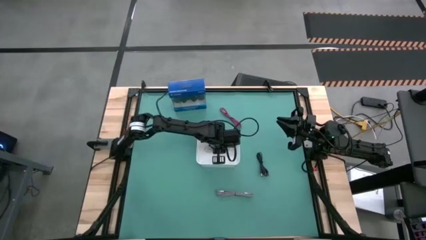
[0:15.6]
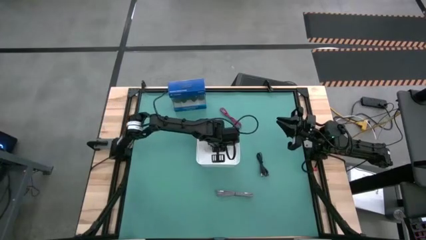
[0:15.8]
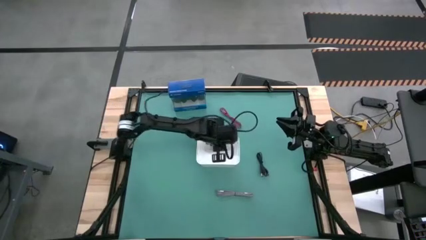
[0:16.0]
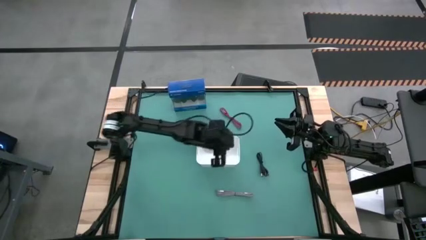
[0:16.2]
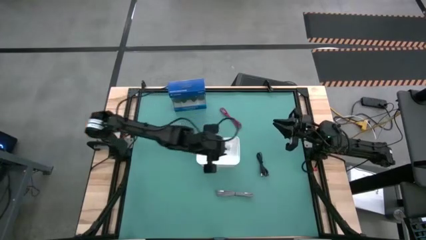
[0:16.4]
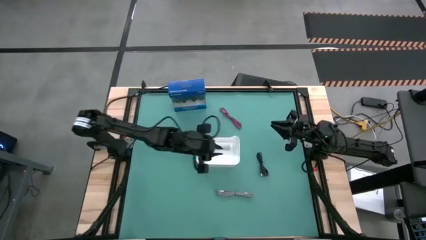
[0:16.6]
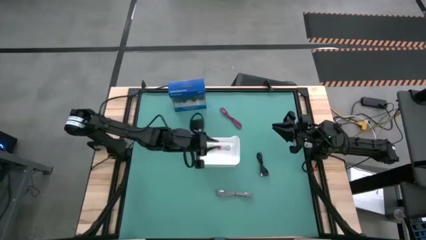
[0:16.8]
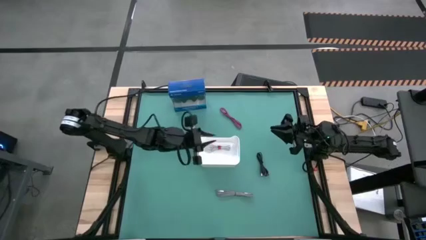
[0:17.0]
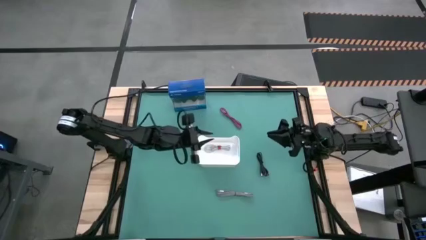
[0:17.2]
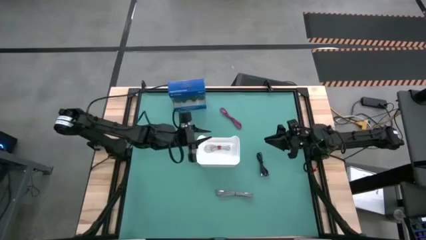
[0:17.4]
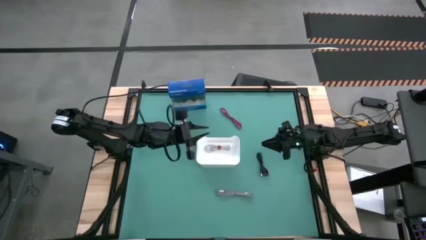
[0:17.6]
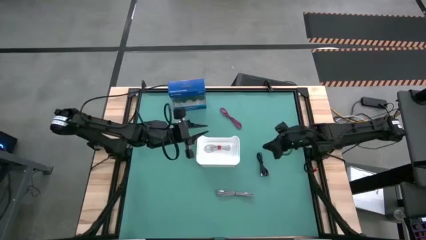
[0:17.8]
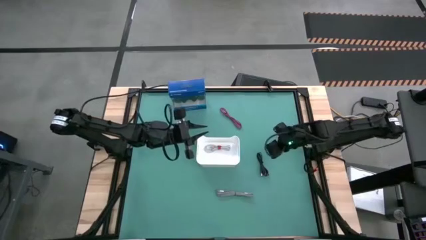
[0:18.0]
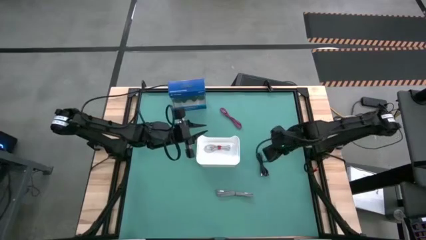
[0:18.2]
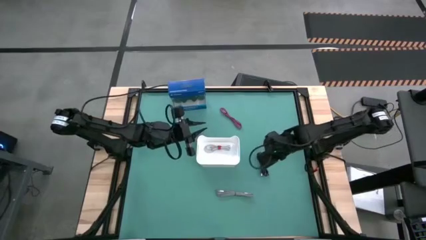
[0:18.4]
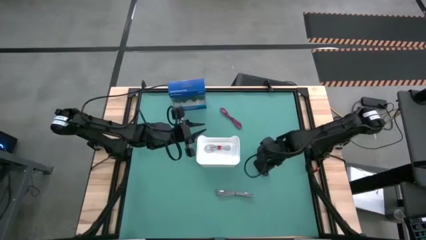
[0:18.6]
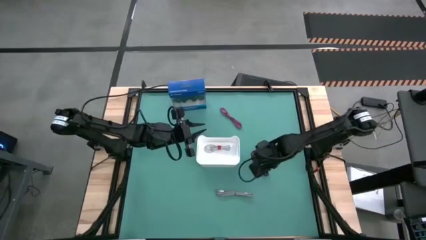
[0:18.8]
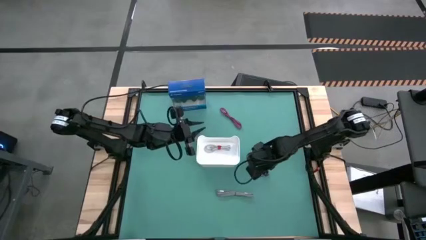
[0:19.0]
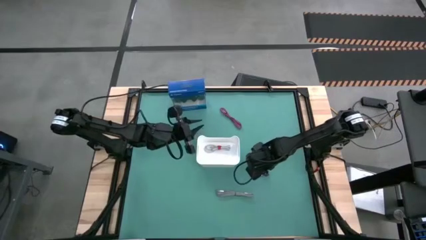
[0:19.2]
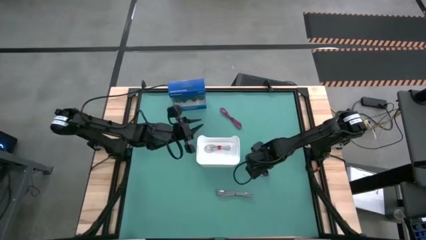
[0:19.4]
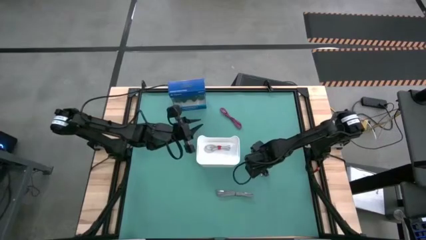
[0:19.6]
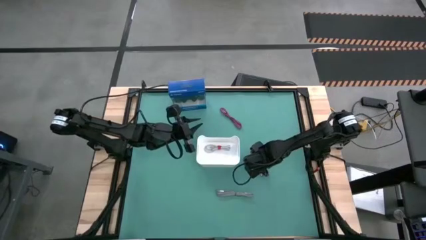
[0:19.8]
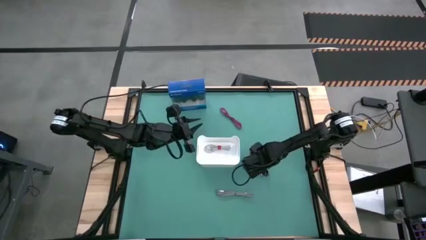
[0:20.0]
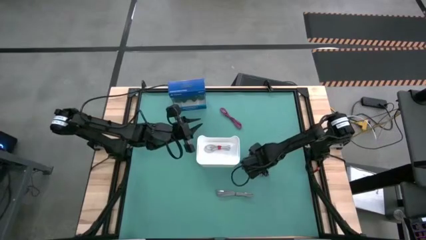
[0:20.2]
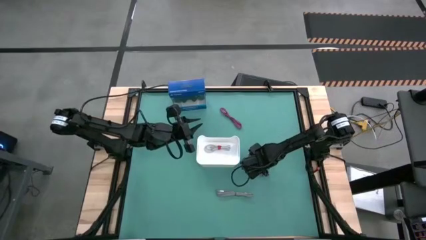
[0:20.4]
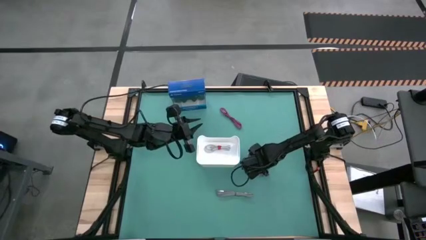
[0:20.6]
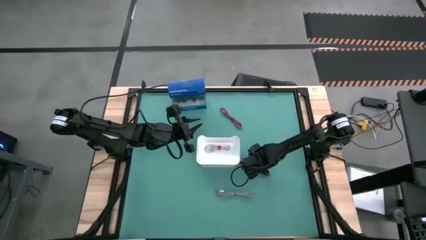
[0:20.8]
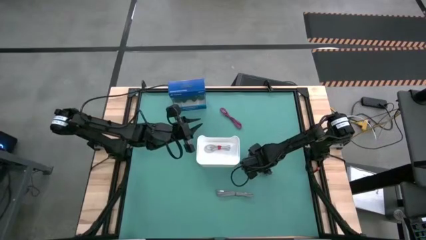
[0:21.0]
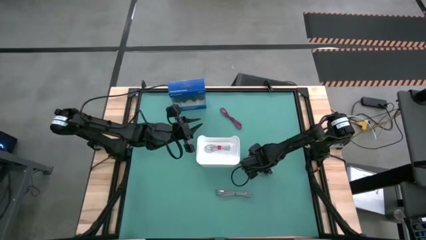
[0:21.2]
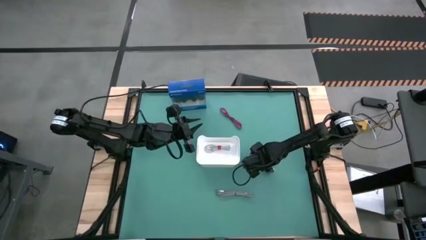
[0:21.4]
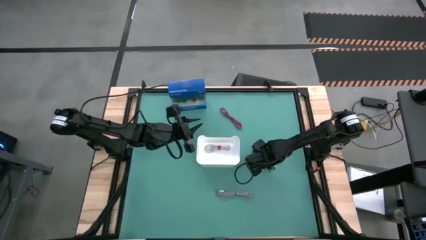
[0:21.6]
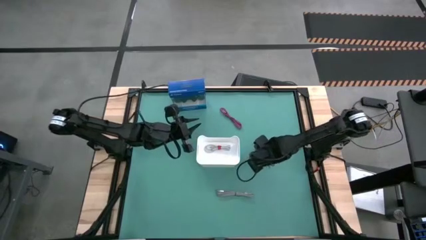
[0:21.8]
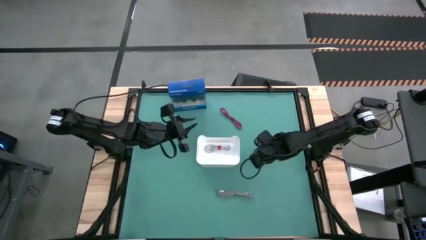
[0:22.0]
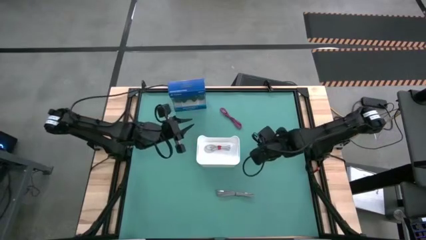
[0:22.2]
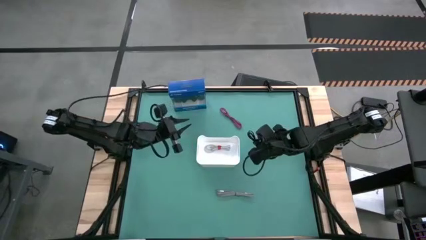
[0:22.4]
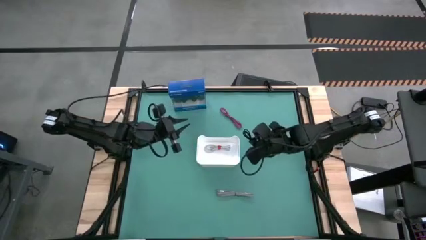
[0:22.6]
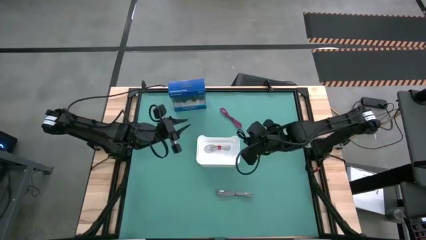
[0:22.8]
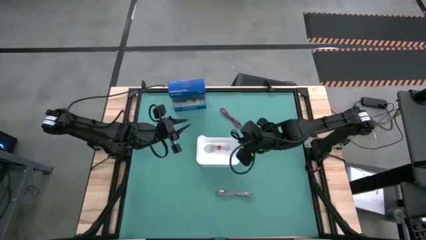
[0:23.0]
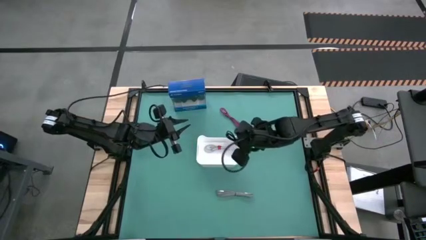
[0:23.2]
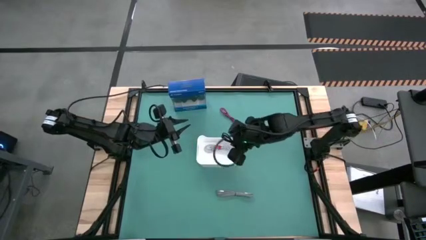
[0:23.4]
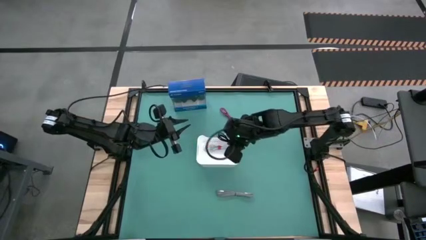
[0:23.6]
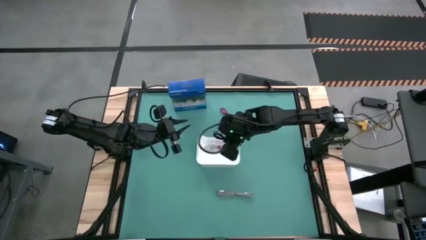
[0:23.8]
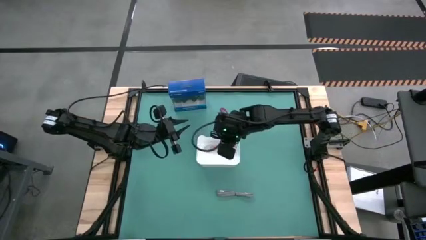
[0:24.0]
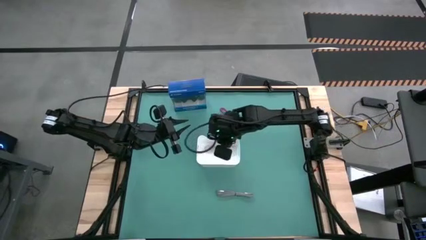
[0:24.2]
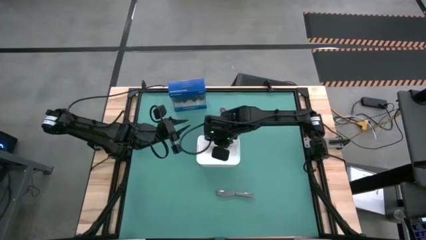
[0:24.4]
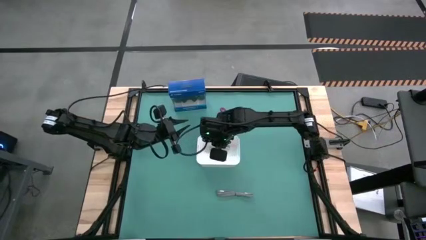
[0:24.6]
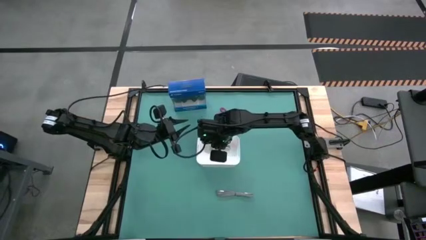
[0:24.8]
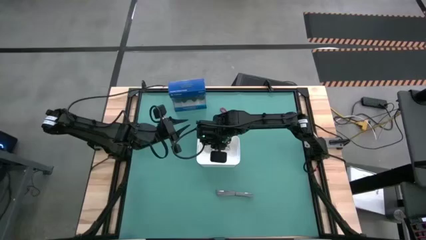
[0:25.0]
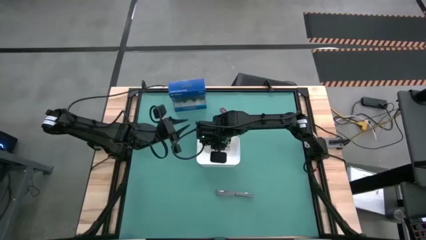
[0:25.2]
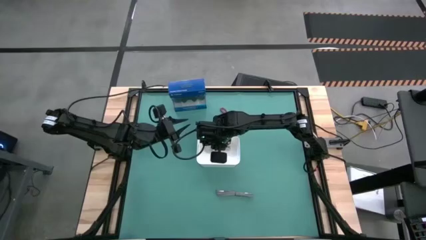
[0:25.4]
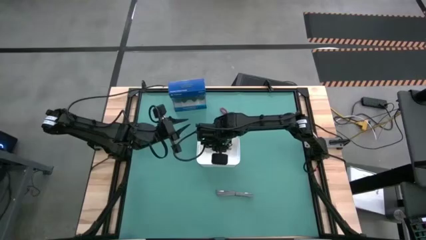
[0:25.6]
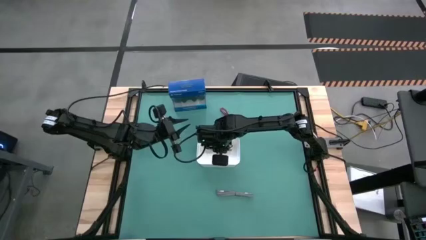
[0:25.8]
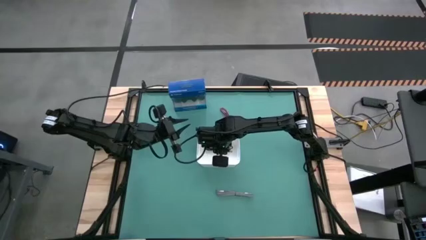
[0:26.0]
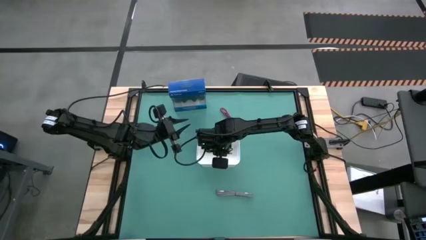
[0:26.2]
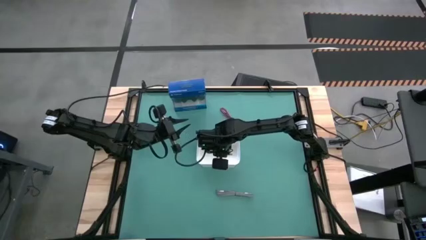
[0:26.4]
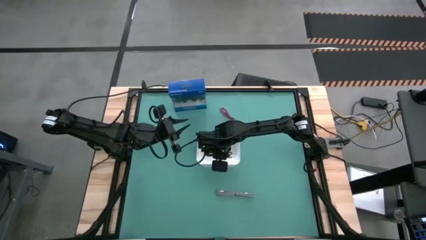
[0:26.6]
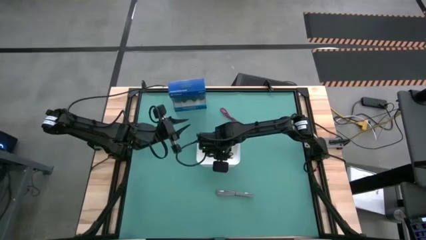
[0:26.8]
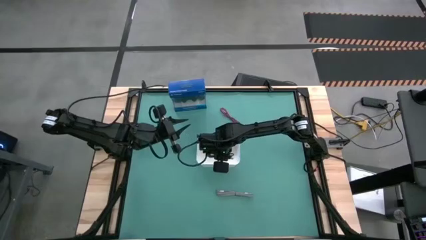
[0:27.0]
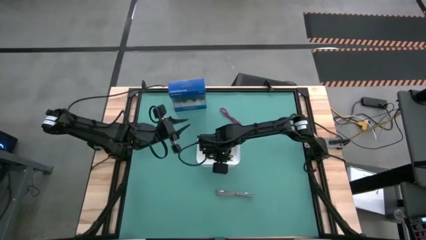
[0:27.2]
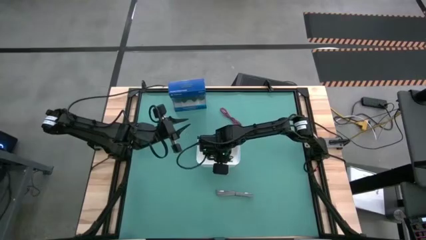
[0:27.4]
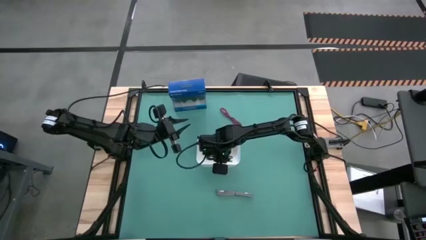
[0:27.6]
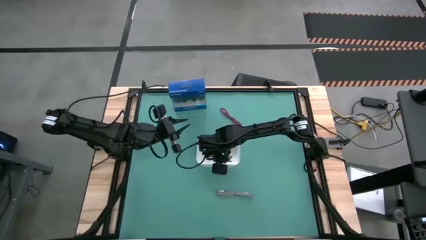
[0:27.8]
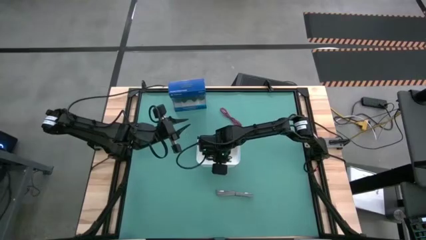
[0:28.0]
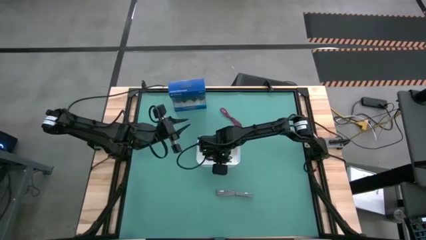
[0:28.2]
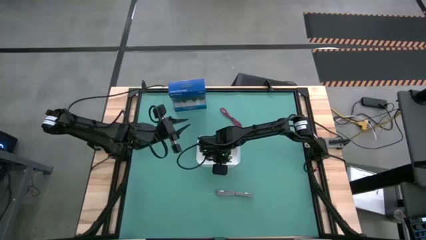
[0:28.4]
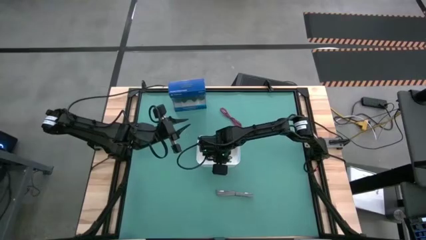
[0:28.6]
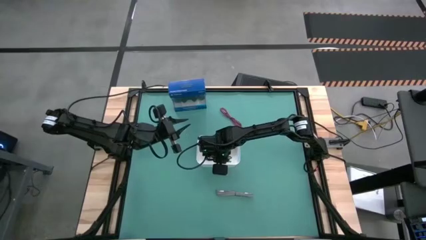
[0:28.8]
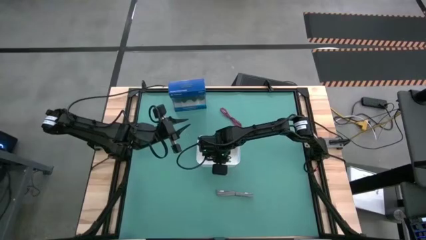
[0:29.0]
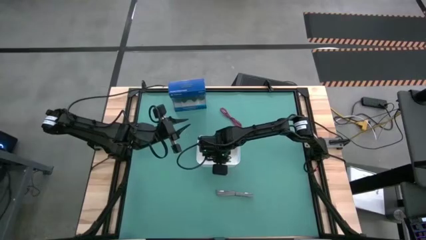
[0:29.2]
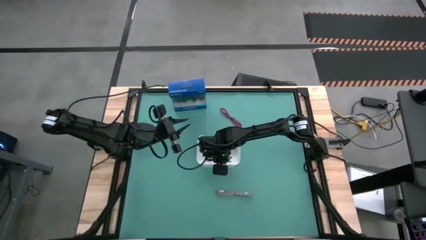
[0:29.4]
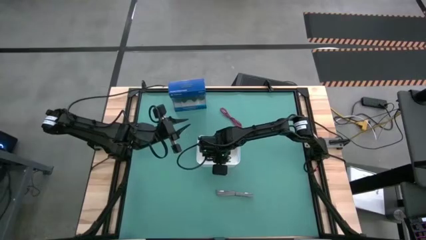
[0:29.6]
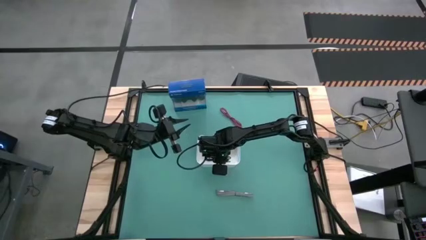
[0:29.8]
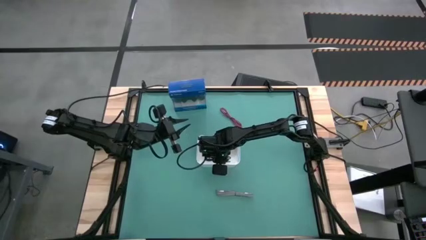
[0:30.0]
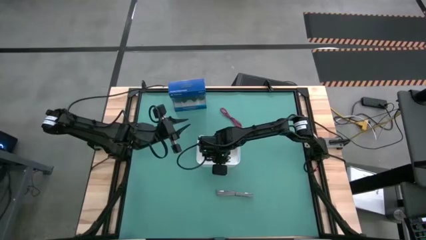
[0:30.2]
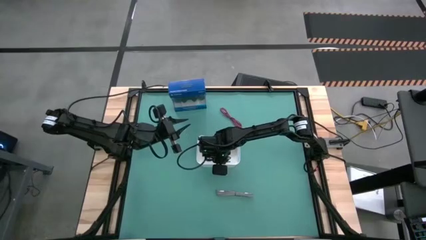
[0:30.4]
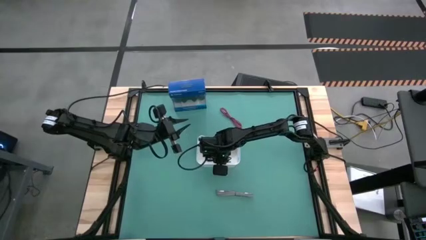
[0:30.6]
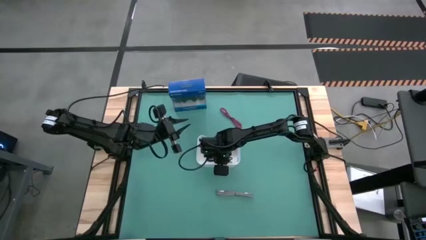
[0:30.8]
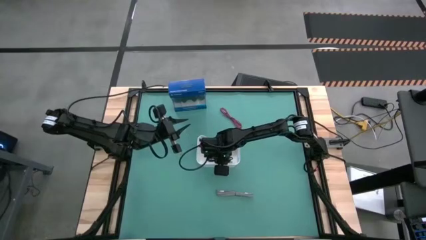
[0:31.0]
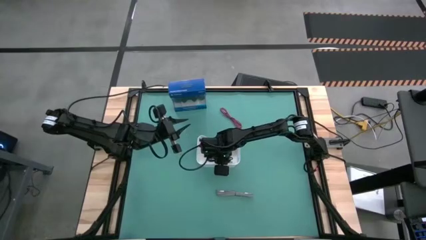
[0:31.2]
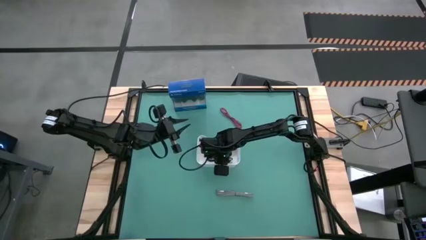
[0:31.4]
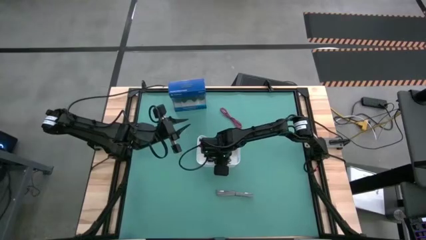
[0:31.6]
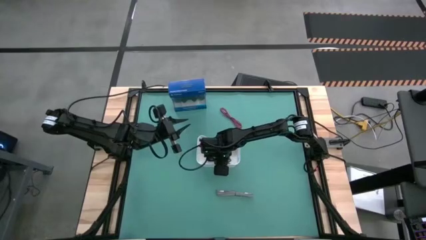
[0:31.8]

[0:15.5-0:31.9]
Task: Pick and place USB-C Cables
Put the black charger cable into the white bin

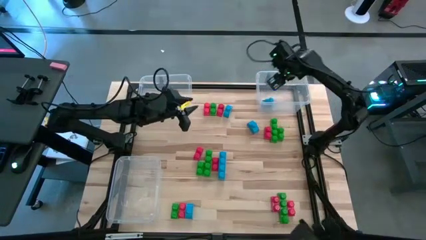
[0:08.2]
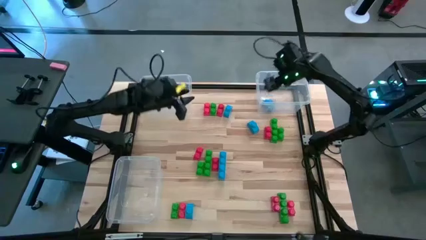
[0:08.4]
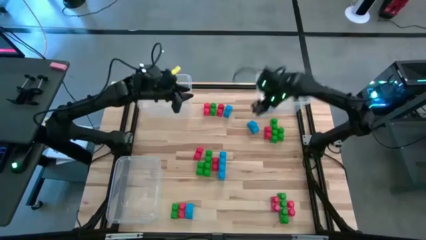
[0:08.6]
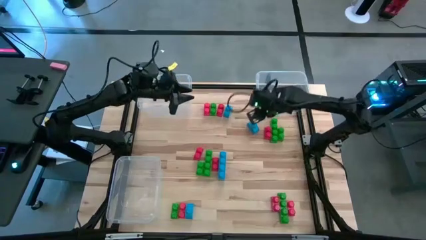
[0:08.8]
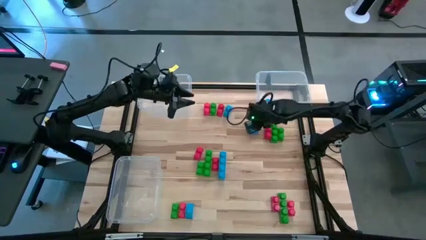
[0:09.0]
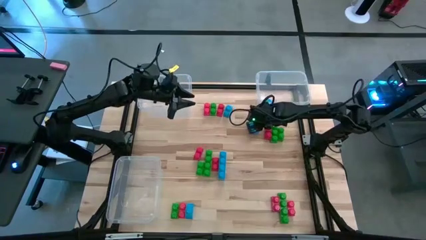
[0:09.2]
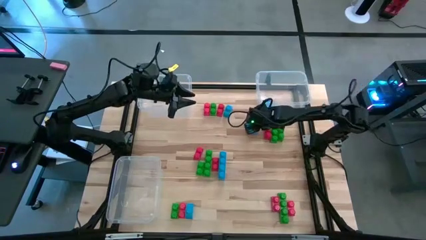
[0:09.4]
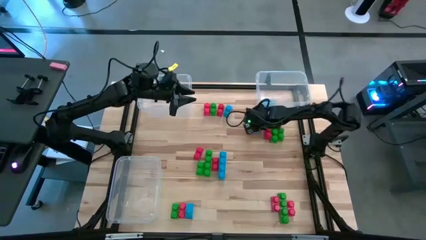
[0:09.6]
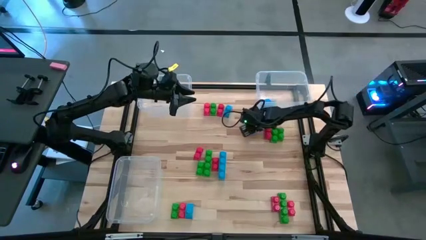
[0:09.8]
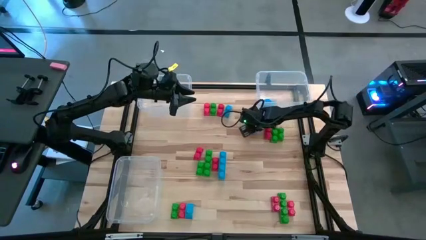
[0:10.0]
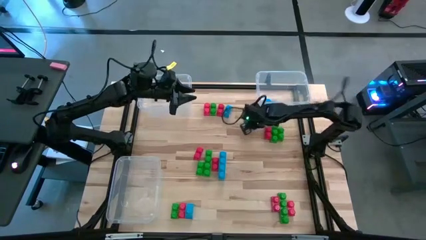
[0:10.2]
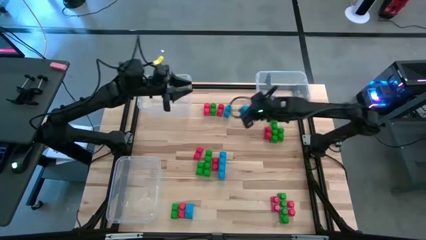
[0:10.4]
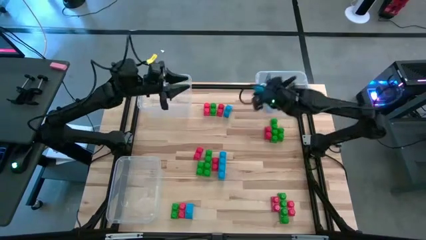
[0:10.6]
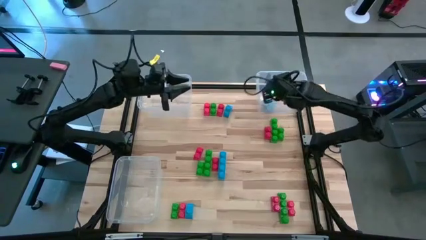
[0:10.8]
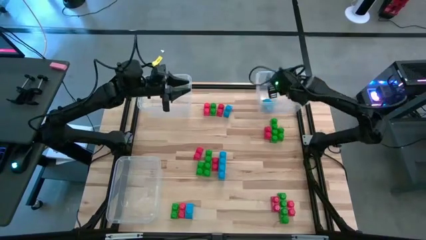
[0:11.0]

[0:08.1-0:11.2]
Task: Sort blocks
Put the blue game piece into the top right transparent bin
